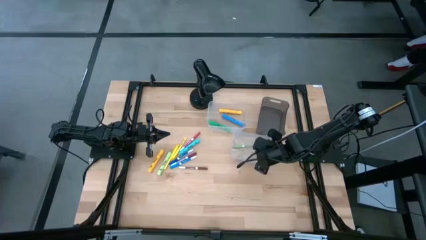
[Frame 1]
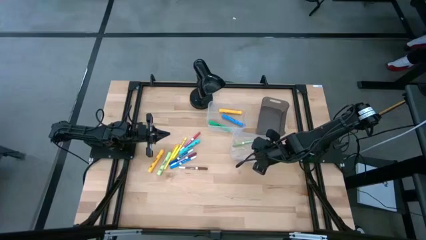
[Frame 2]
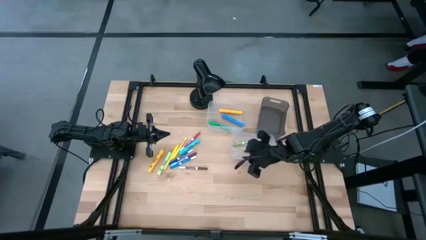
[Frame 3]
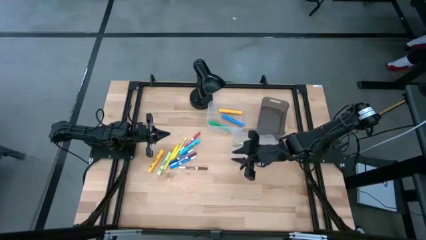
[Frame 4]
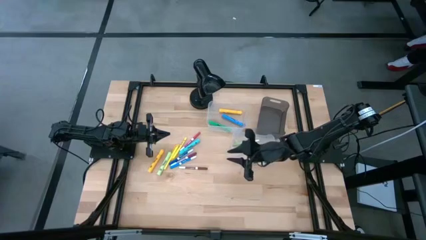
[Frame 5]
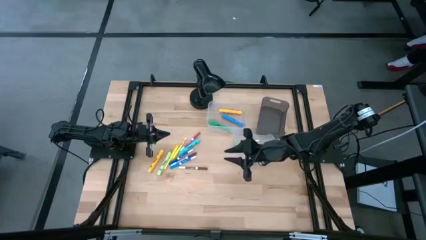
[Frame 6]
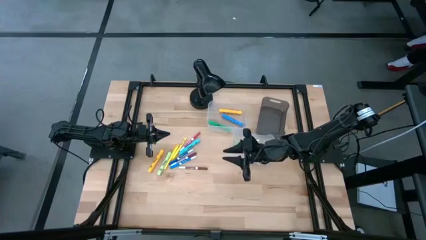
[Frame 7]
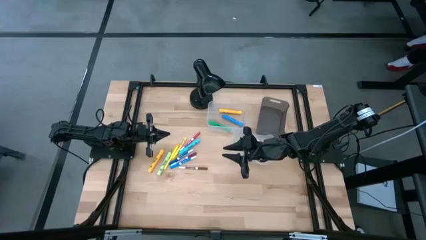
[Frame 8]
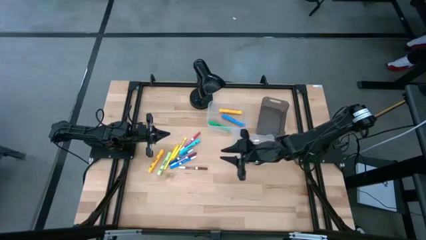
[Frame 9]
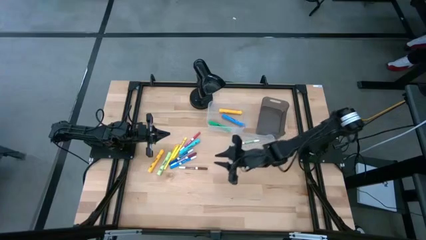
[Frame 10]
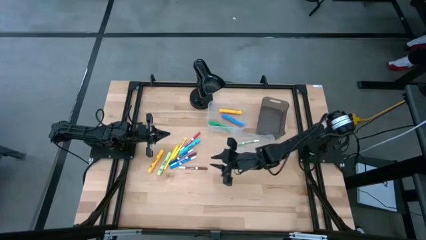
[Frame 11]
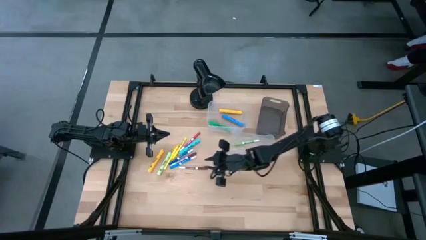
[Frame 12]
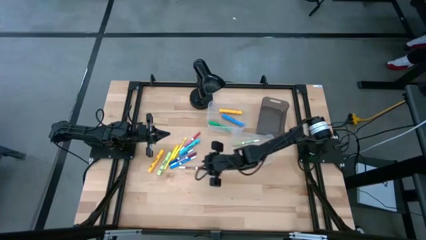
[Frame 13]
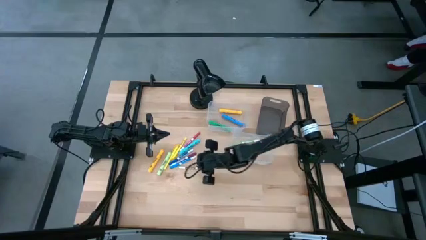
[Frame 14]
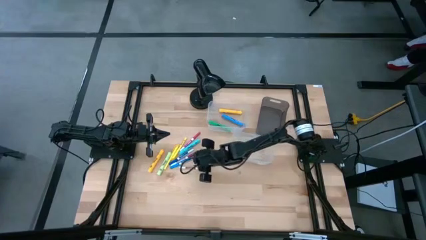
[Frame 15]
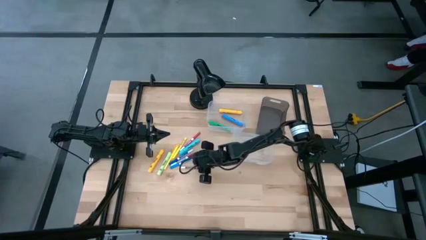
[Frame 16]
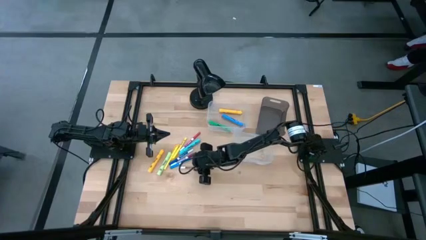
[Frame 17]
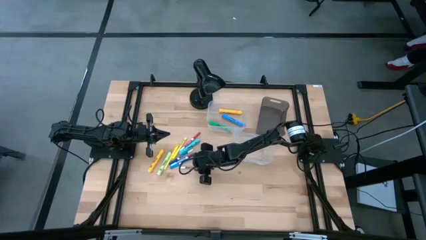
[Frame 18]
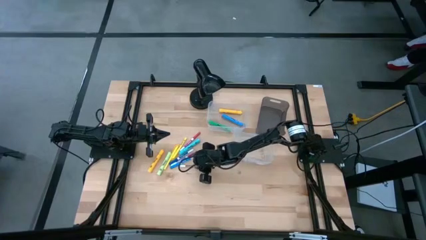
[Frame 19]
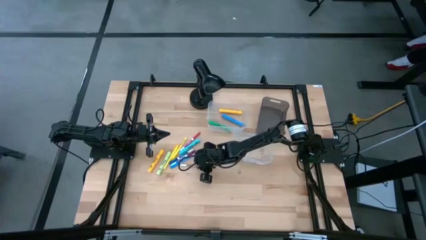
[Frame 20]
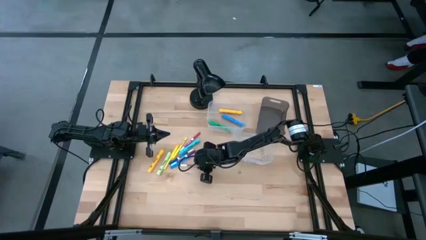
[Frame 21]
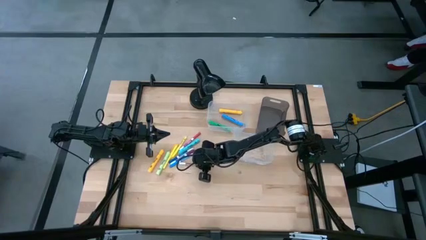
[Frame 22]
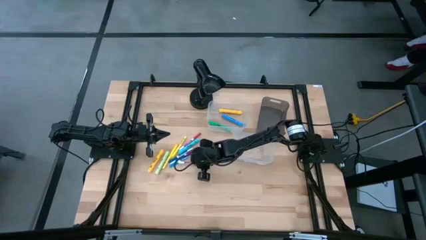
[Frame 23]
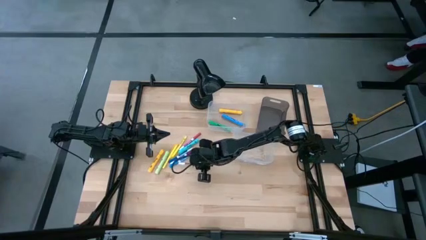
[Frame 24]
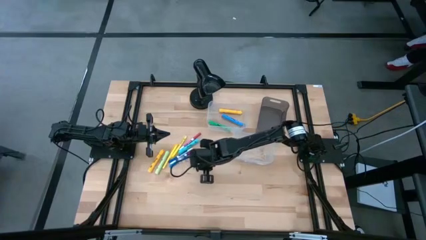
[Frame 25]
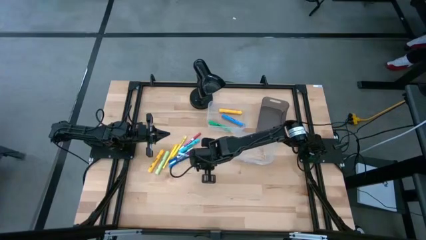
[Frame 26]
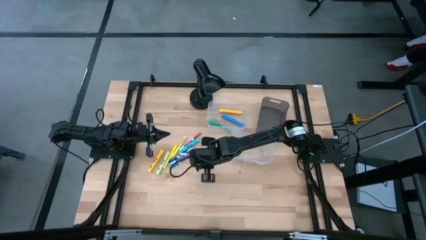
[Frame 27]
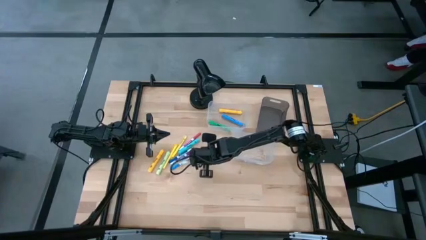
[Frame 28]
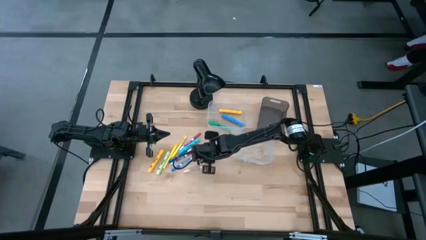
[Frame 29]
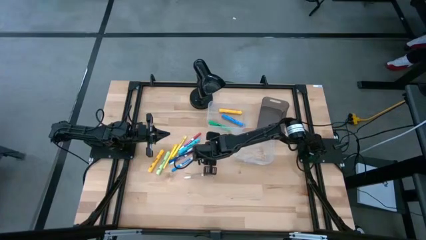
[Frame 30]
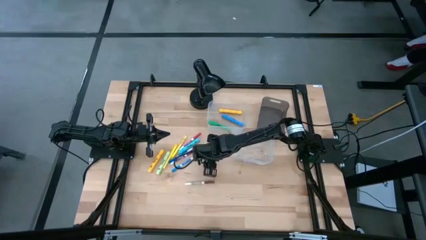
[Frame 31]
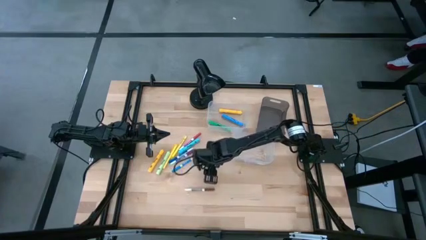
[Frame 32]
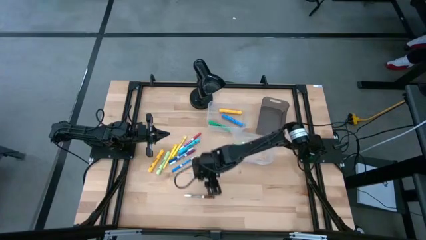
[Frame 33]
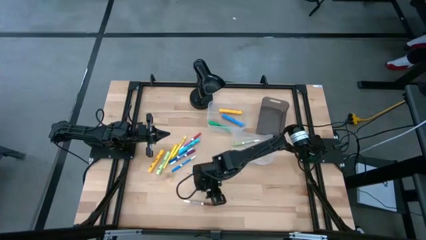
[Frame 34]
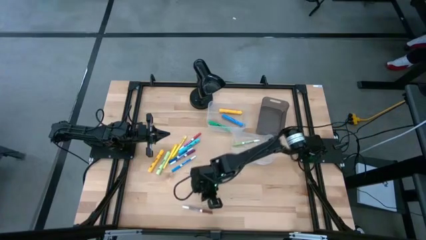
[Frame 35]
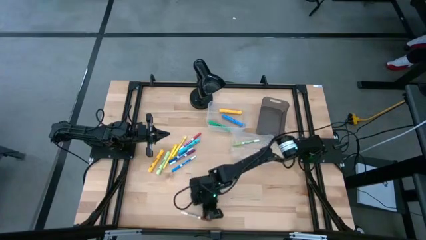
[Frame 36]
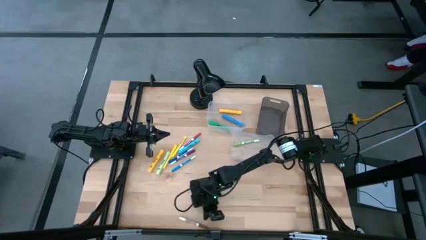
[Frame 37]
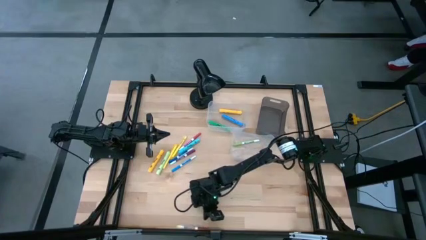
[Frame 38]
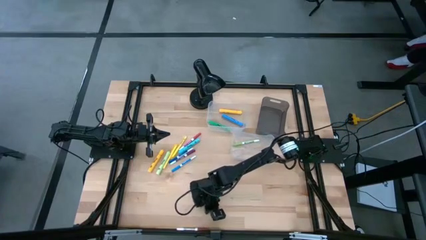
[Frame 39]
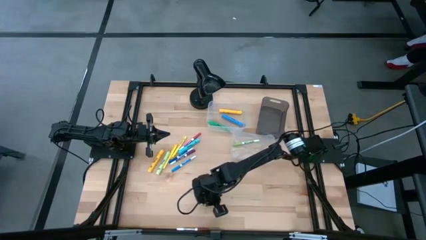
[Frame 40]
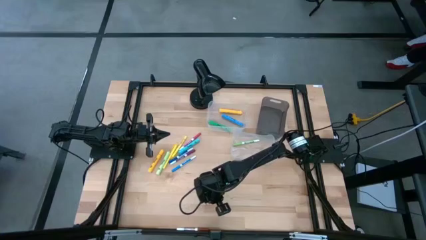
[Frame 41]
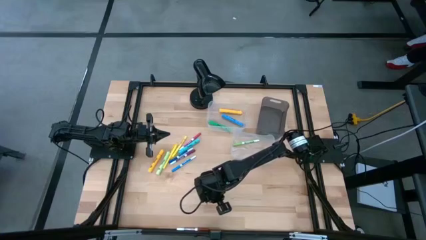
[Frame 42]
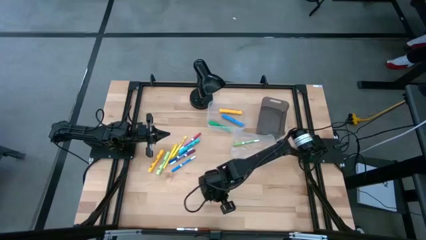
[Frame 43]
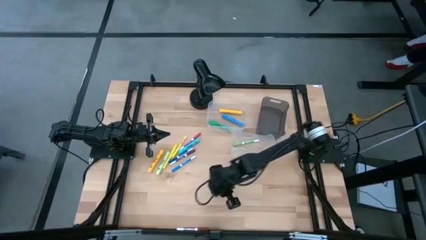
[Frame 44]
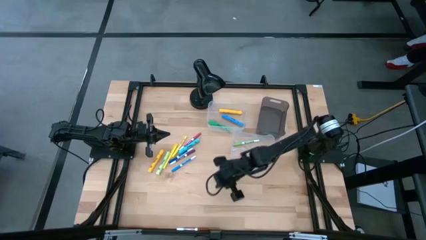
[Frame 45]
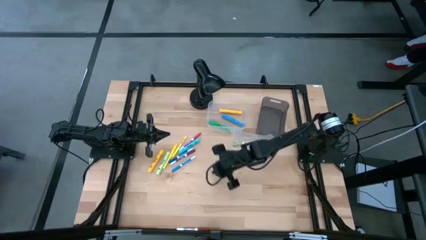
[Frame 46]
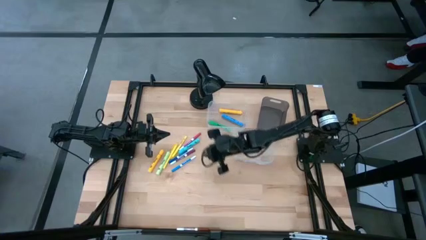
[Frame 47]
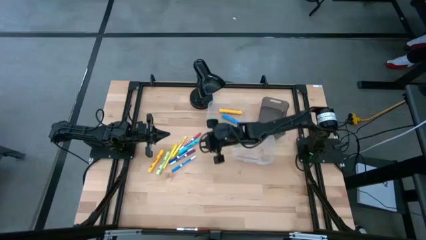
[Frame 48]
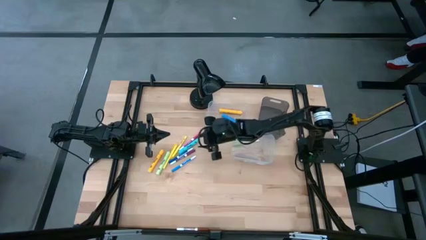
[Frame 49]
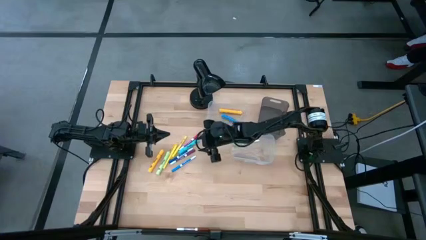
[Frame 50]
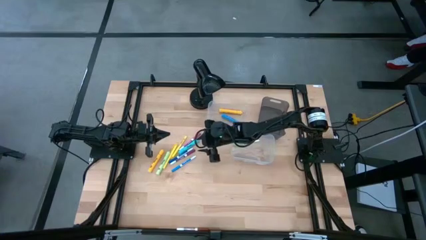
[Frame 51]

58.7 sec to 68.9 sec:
Task: Pick & Place Markers
Put the brown marker pen into the bottom transparent bin

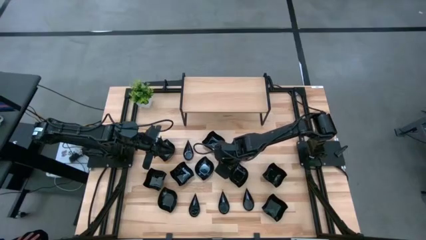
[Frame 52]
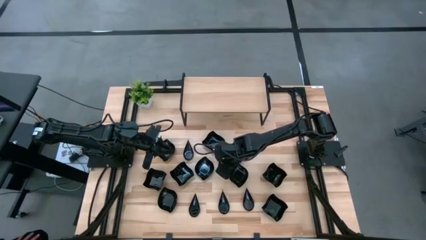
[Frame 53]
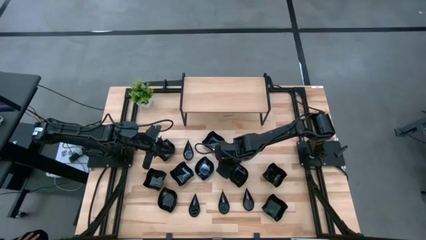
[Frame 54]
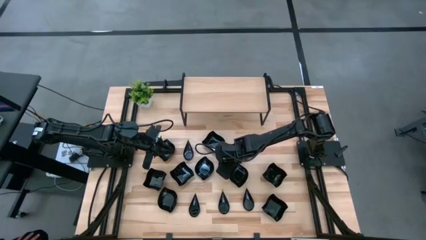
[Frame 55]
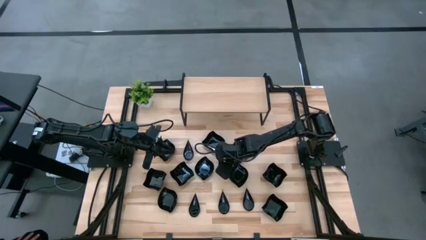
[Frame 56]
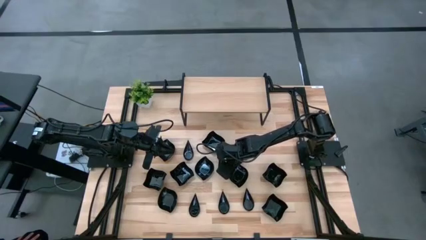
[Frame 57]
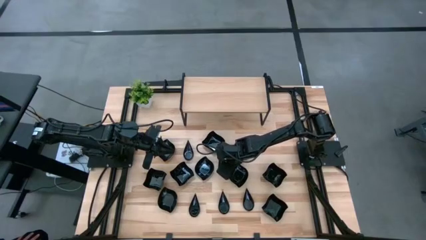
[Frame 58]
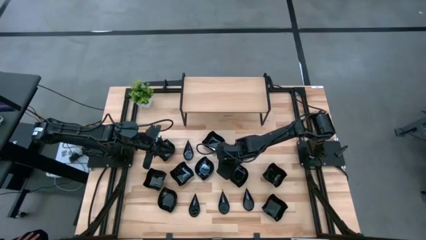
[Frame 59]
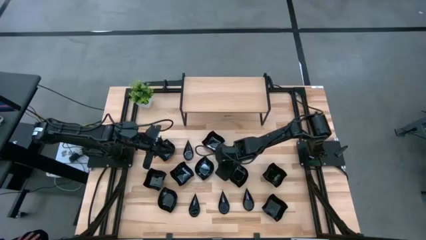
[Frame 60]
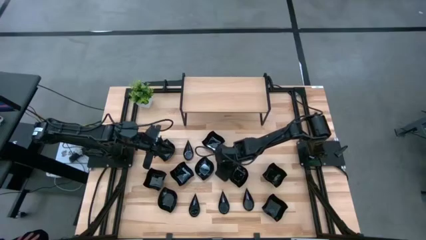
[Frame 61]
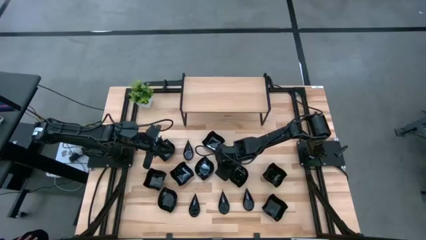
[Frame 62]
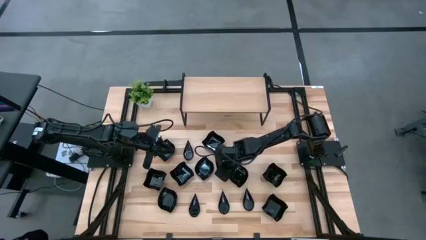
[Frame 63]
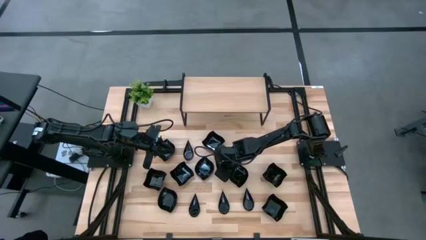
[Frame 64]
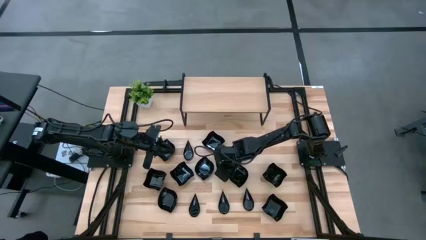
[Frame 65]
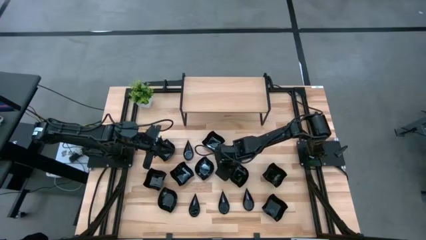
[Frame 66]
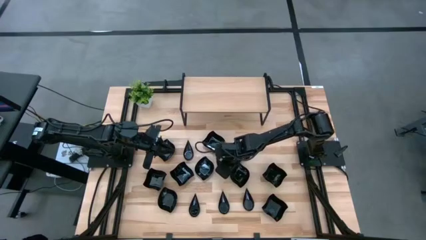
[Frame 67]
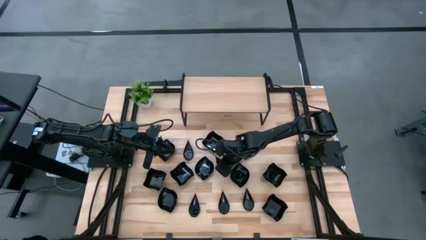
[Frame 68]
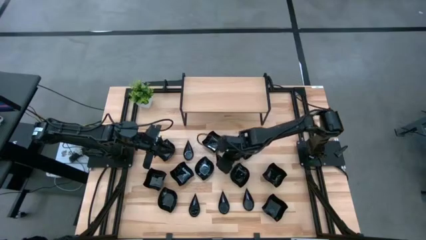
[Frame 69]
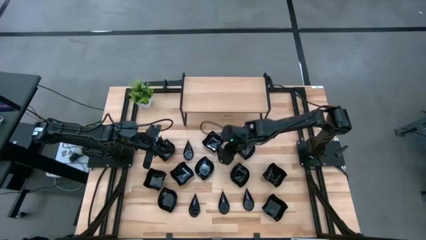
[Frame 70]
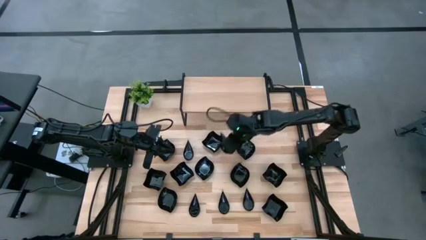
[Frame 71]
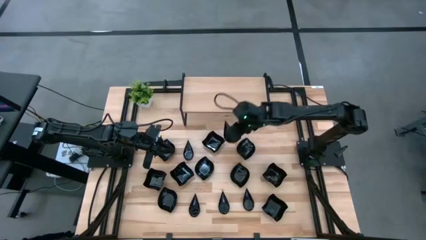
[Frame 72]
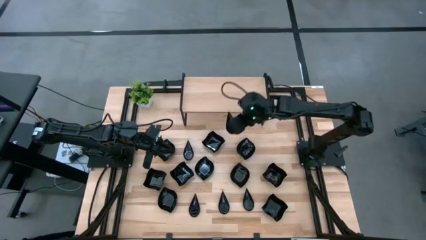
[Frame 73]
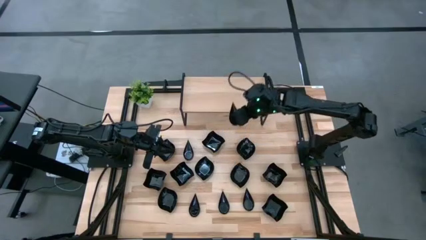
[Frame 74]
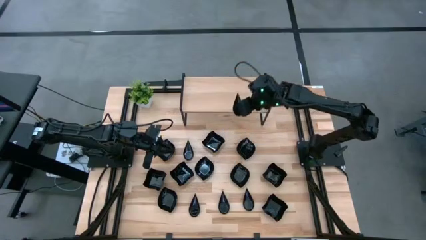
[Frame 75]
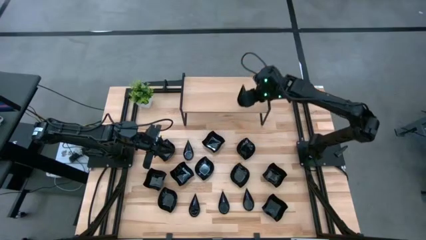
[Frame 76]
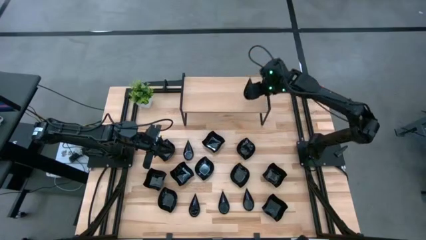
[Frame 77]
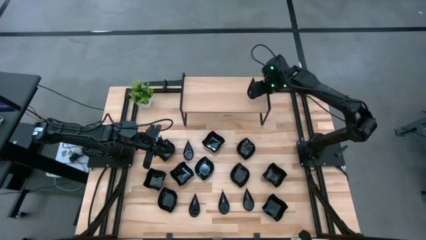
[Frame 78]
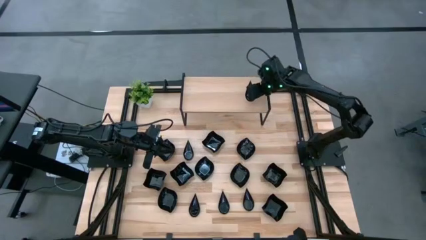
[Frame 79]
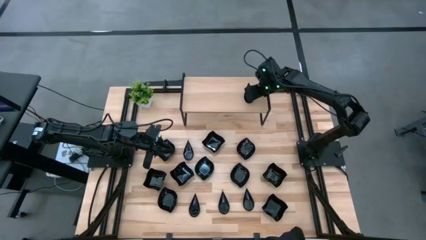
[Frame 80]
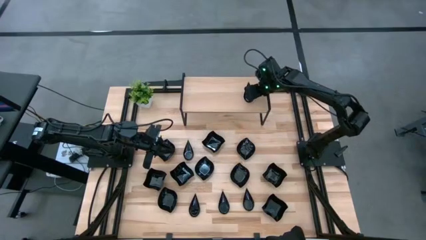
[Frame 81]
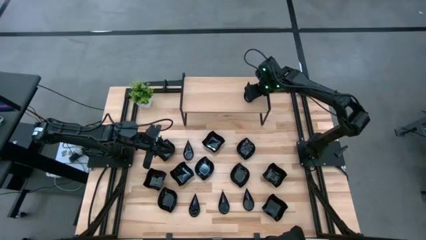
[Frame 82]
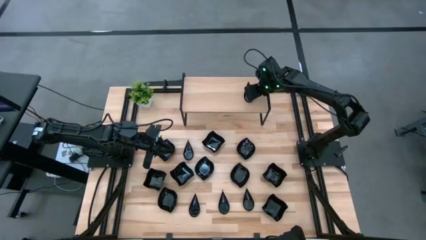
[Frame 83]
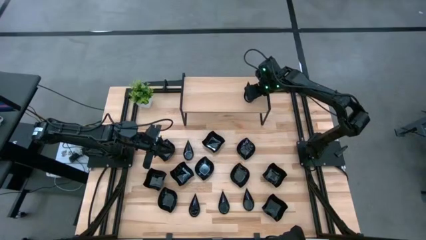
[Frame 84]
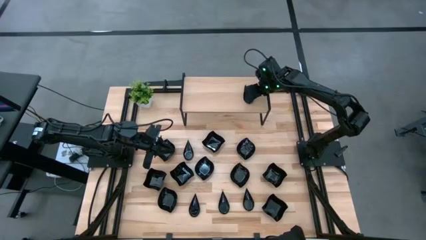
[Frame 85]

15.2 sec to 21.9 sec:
Task: Pick & Place Mini shaped plates
Put the black drop shaped plate on the shelf
